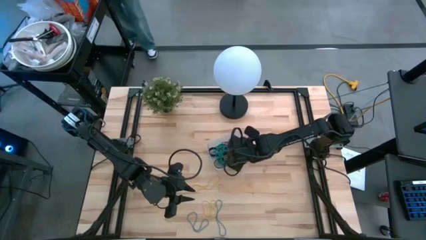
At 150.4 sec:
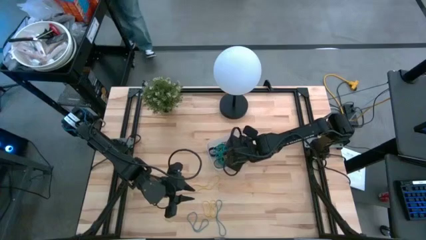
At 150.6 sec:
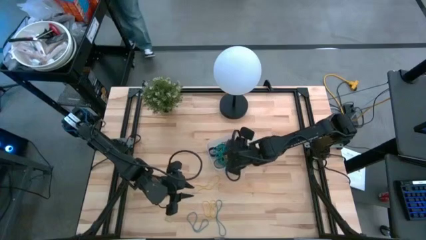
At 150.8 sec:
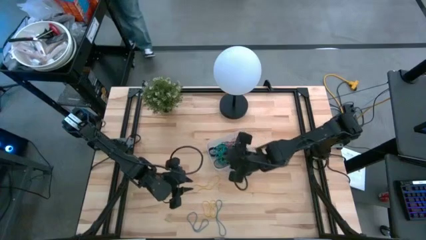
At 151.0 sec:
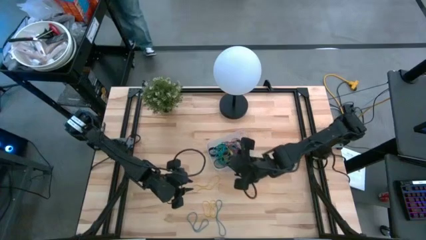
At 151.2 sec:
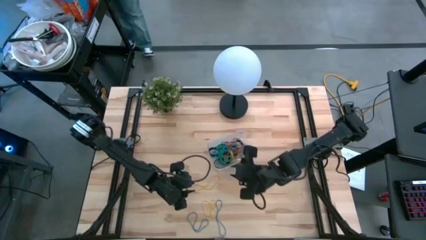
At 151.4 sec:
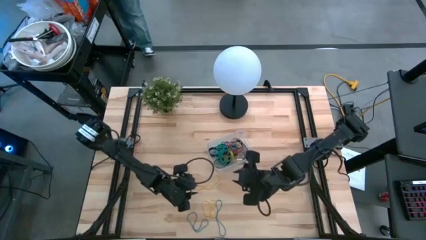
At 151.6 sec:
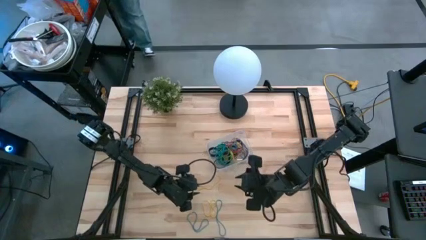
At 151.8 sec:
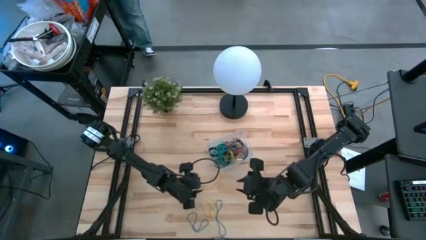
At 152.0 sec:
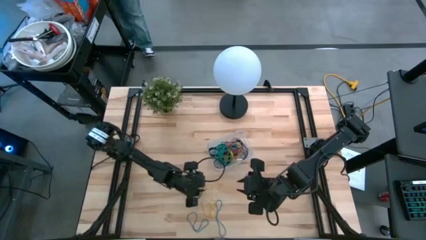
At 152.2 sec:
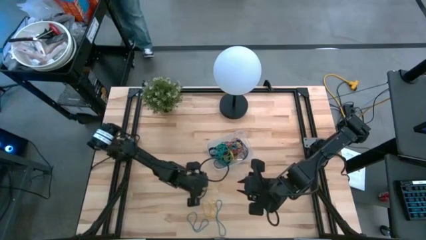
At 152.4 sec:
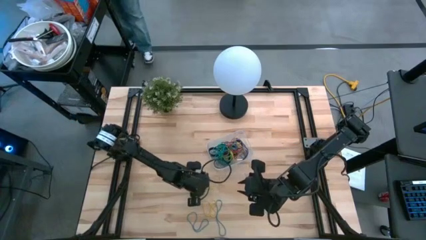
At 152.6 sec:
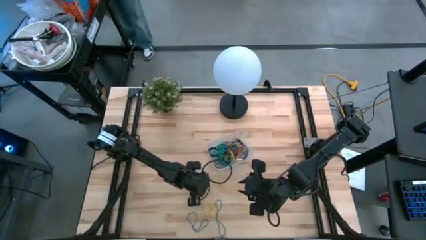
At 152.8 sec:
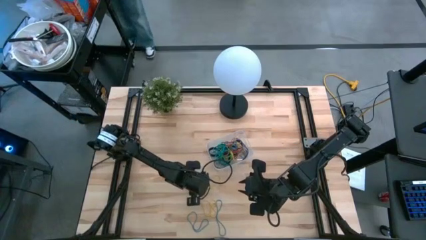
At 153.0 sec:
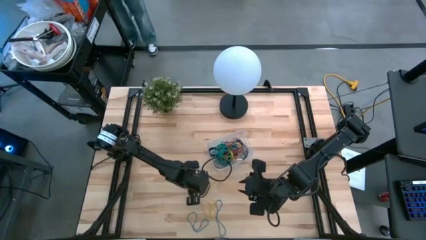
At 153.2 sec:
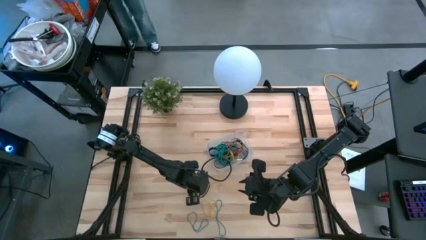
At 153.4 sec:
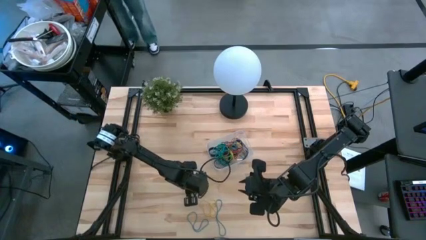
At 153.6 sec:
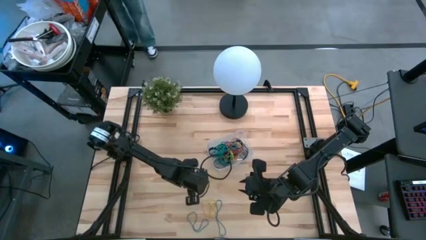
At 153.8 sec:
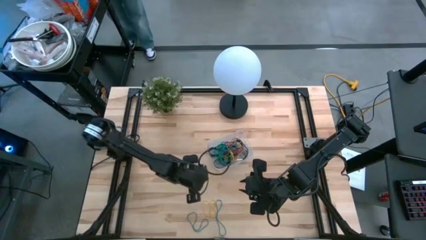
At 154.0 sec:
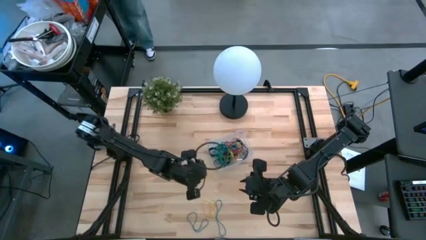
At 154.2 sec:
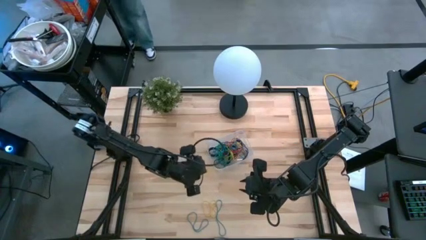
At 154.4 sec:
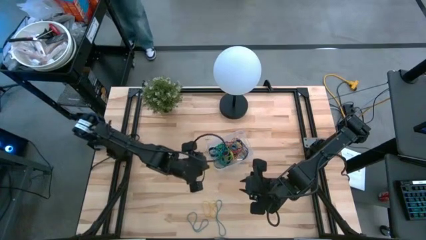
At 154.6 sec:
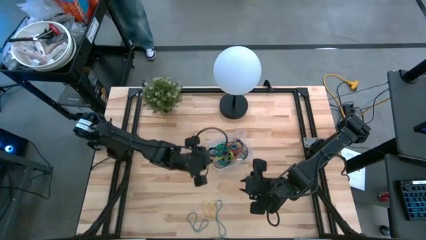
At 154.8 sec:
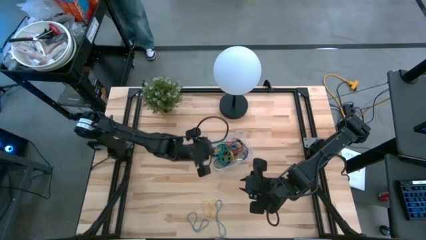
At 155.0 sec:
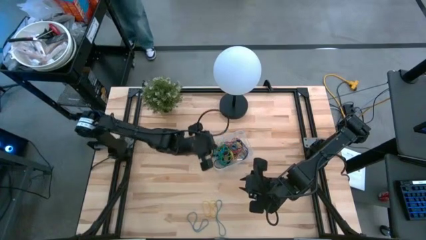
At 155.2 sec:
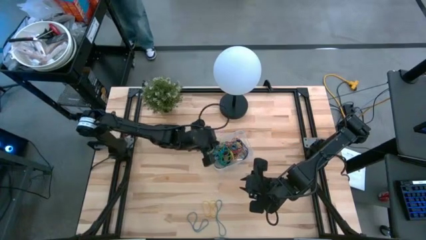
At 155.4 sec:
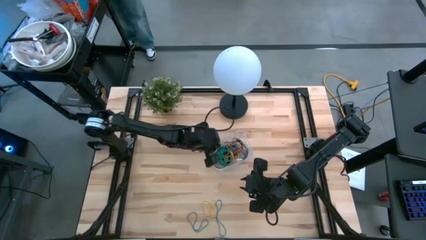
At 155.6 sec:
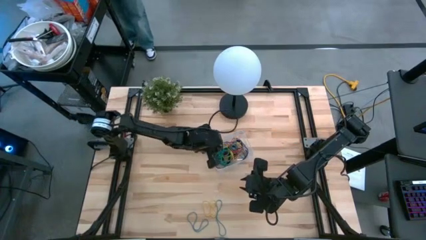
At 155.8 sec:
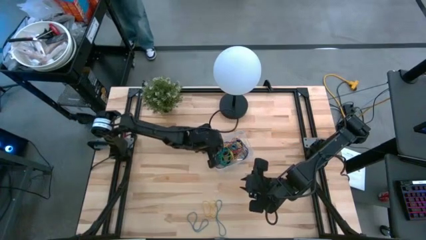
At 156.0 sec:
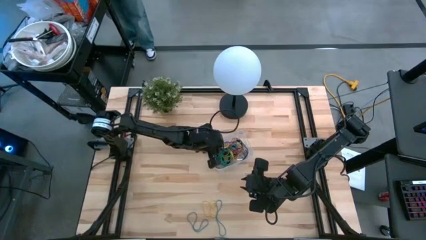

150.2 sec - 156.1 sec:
Task: Pick and place rubber bands into bin
Put the yellow rubber band into the transparent bin

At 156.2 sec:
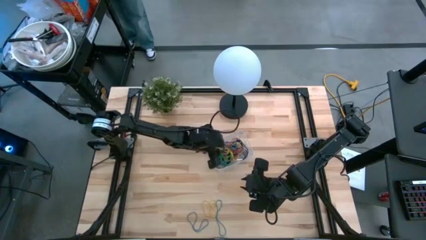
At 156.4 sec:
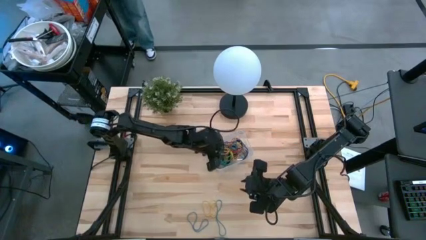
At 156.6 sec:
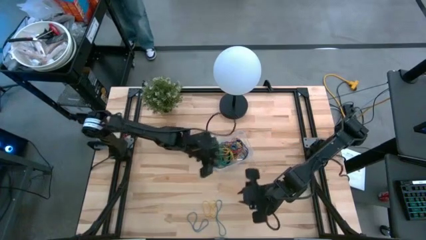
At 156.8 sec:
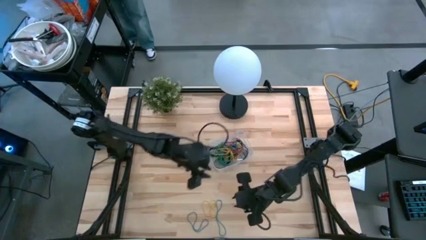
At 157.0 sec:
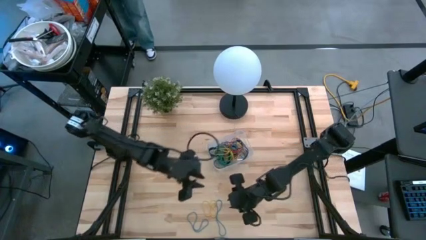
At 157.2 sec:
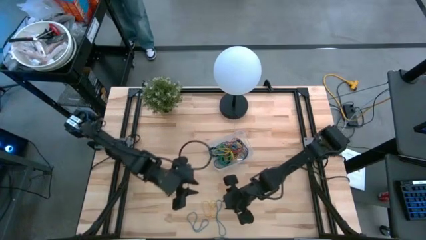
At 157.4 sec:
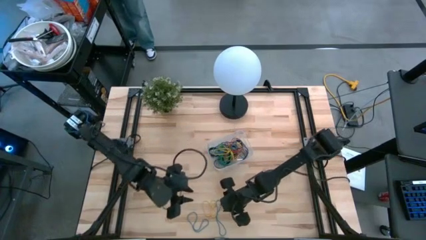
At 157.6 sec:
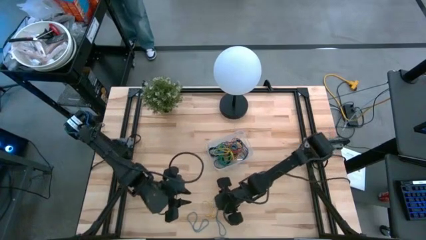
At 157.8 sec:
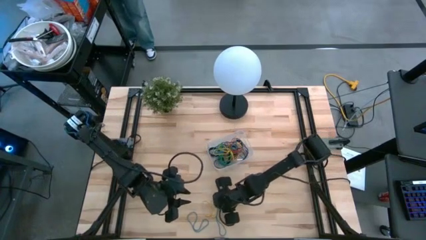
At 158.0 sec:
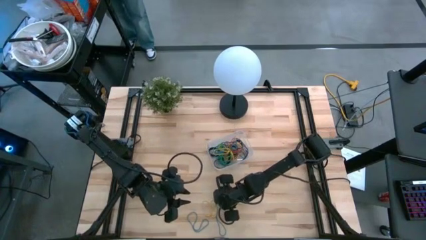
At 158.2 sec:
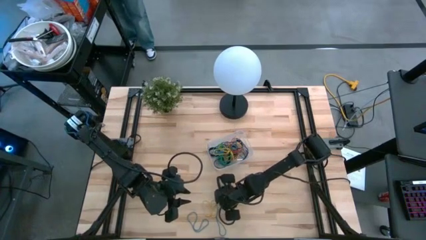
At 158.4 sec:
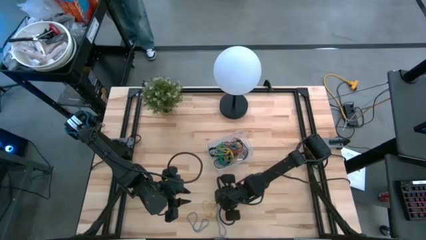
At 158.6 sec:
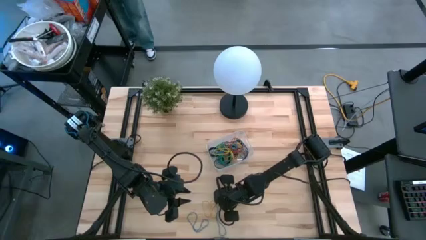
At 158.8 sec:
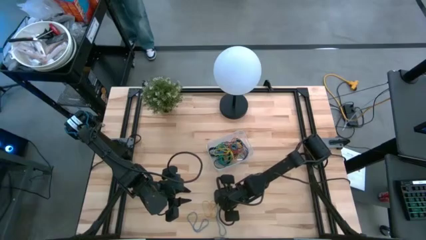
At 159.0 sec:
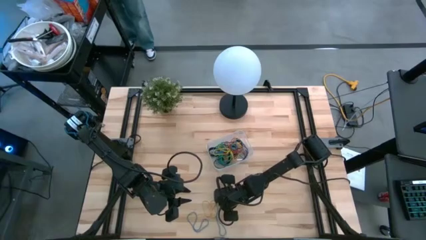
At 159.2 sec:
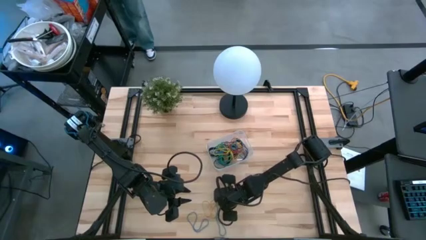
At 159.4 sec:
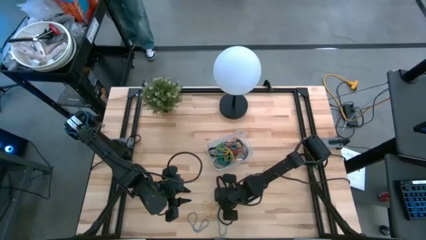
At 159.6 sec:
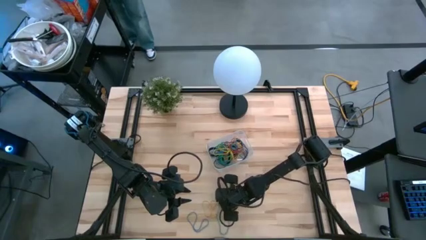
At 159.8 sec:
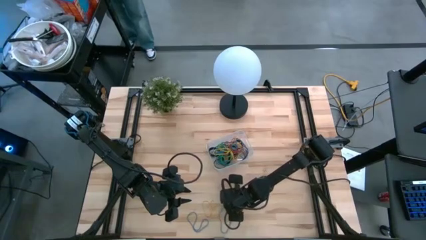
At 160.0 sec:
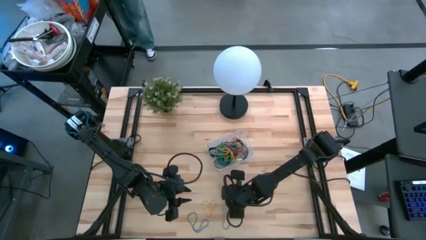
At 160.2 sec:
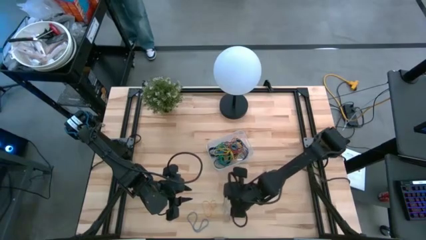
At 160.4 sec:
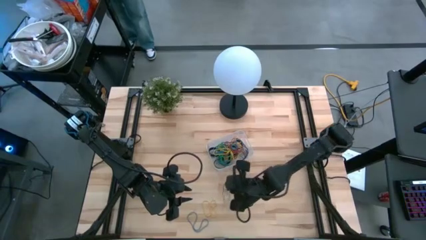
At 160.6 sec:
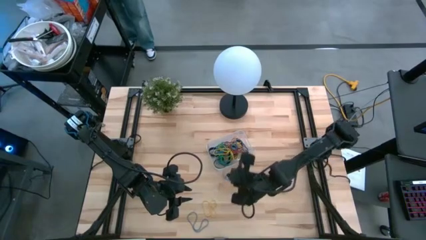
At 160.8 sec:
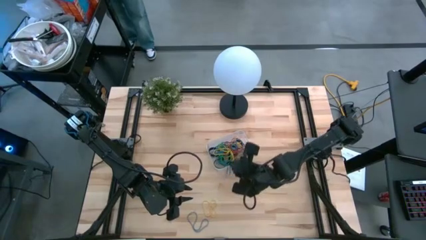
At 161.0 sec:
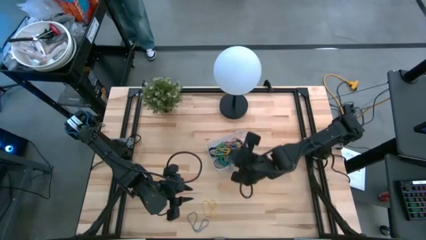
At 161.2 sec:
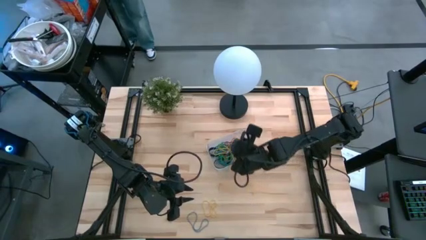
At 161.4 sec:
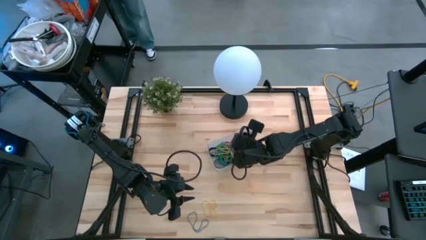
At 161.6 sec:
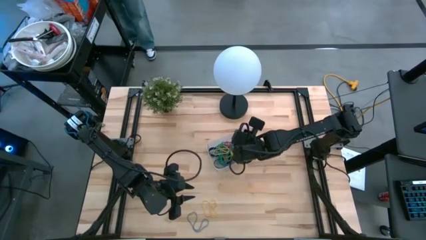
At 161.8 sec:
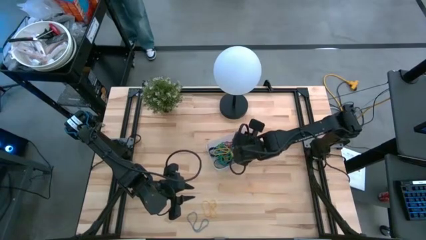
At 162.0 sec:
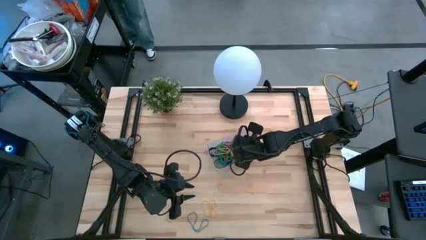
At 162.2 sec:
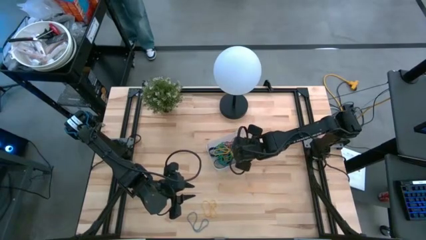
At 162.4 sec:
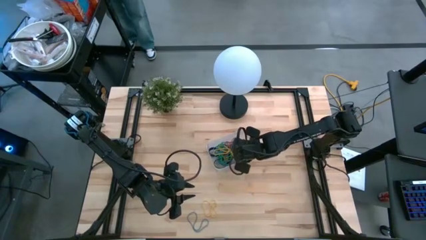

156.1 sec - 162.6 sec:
Put the blue rubber band into the transparent bin

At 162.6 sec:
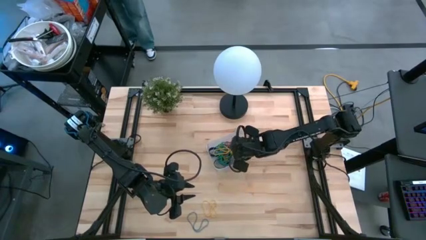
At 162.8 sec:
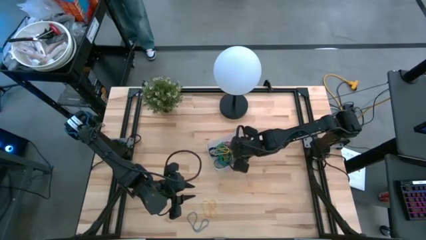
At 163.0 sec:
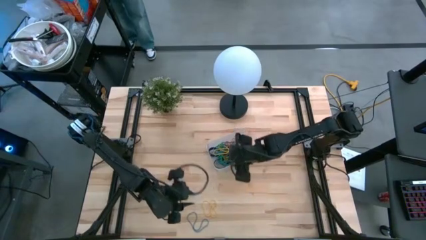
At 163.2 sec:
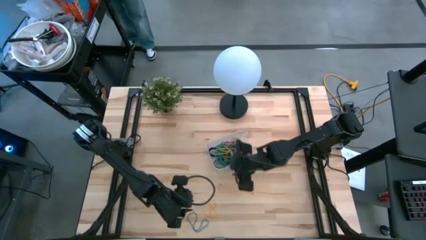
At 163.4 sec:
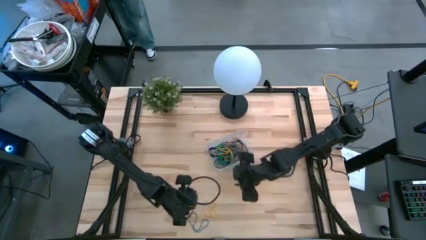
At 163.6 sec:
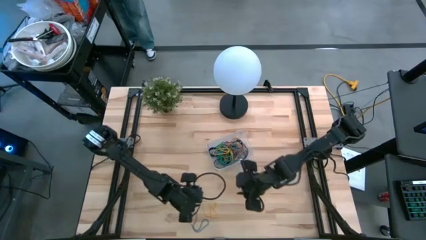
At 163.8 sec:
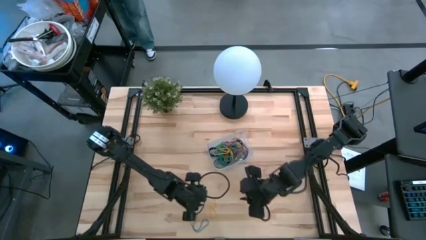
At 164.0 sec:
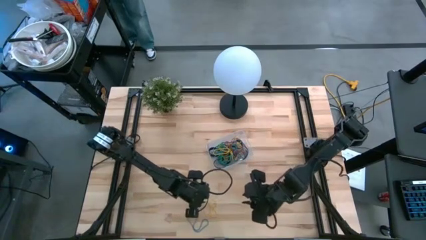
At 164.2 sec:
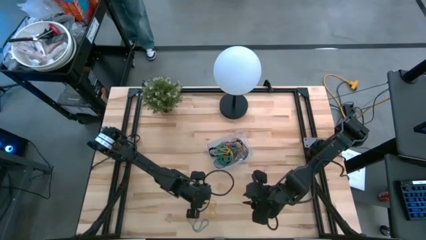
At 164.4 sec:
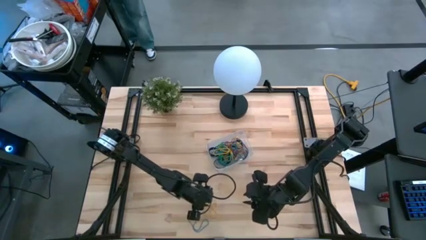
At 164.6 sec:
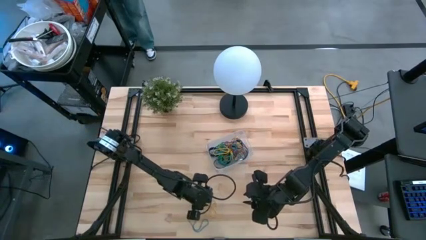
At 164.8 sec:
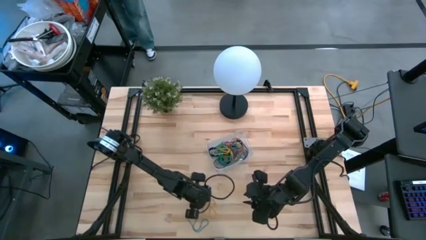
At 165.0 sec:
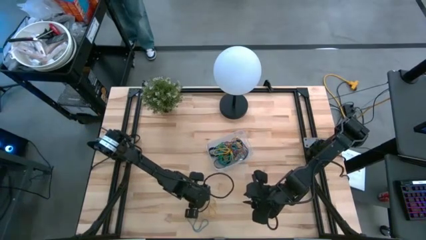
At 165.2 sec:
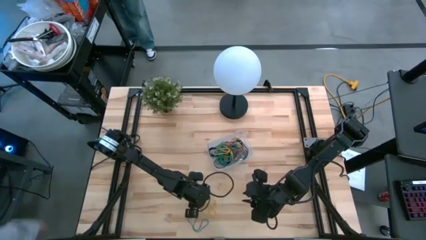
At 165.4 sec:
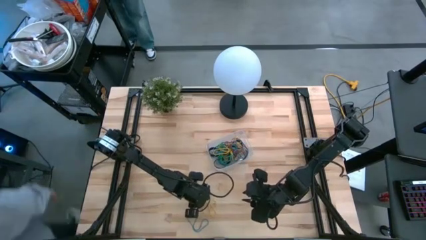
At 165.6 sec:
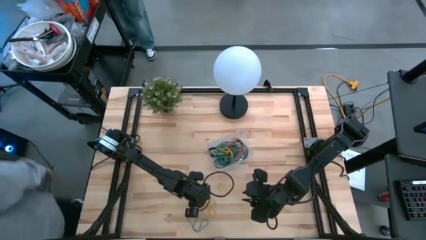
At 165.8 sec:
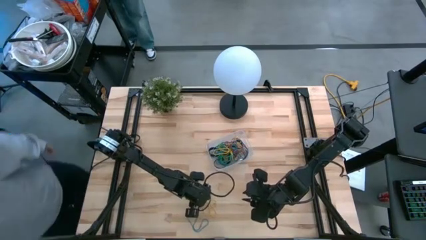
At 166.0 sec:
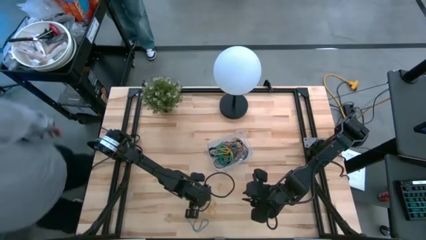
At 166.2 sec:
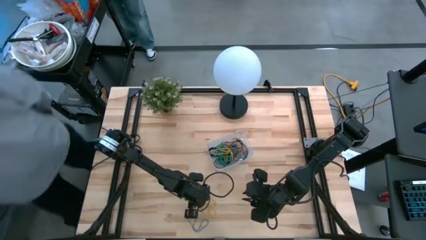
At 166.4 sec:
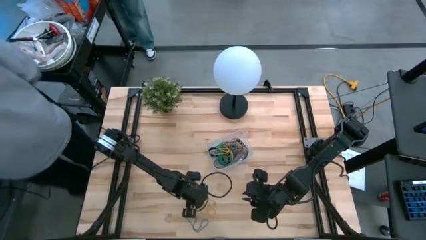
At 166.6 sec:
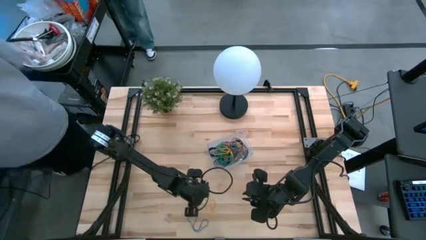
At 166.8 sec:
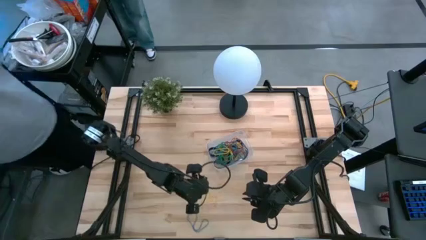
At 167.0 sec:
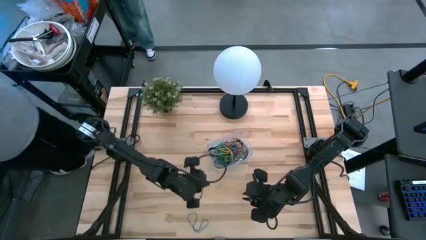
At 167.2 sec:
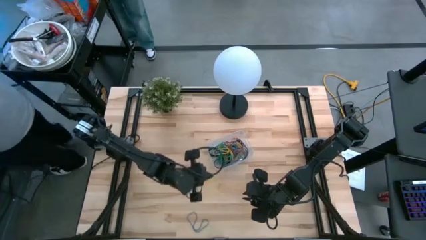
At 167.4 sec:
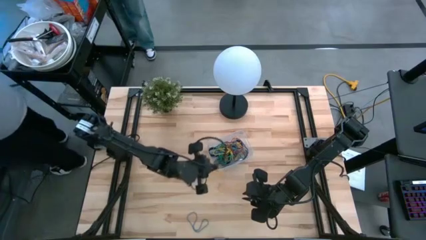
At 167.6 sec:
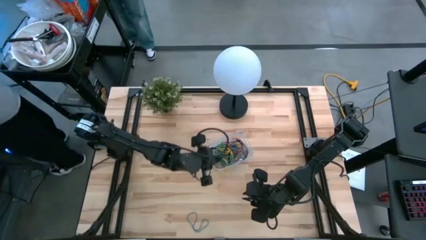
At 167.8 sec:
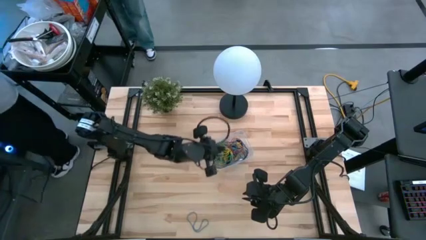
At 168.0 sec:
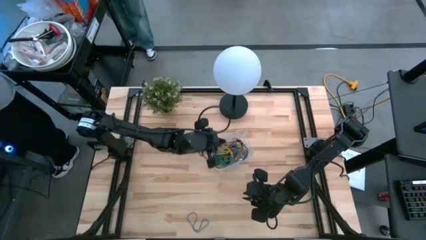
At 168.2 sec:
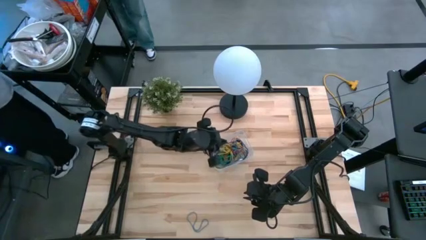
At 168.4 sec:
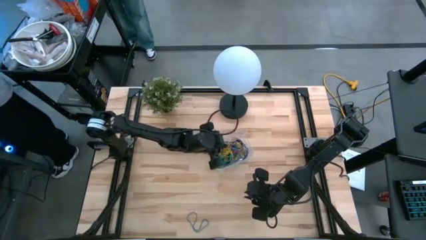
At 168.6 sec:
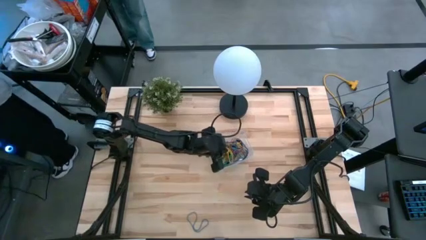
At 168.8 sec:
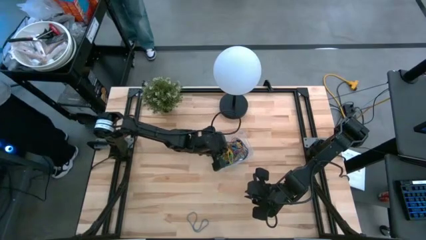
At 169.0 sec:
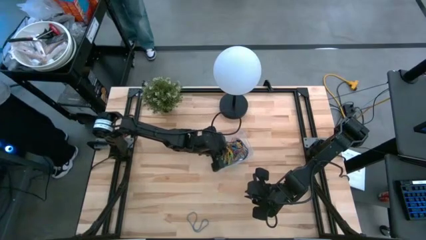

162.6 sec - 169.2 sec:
Put the yellow rubber band into the transparent bin
